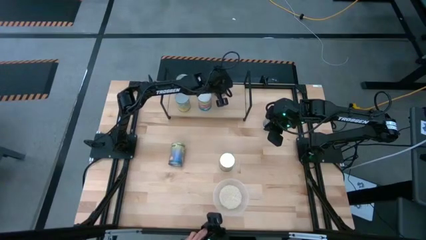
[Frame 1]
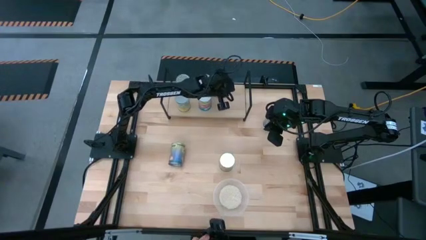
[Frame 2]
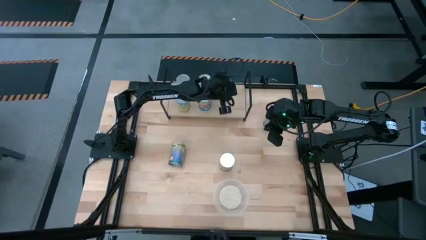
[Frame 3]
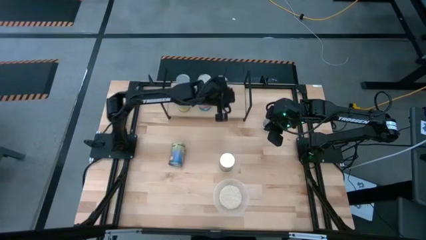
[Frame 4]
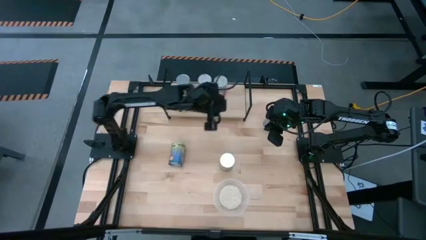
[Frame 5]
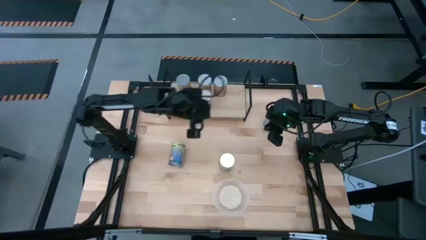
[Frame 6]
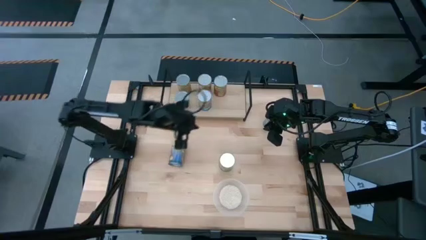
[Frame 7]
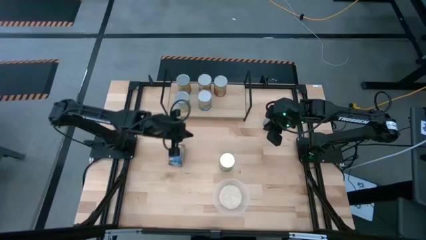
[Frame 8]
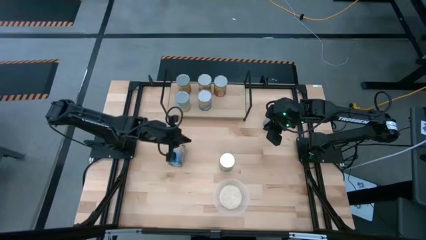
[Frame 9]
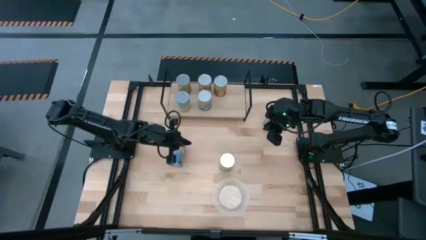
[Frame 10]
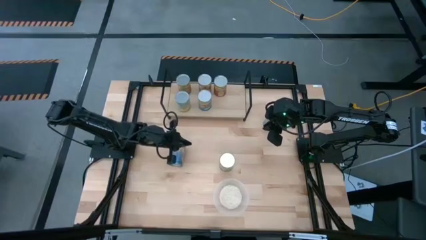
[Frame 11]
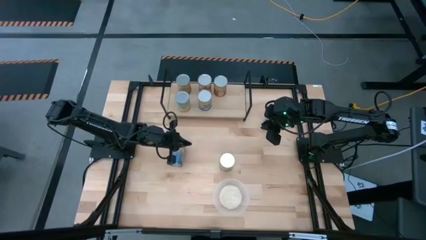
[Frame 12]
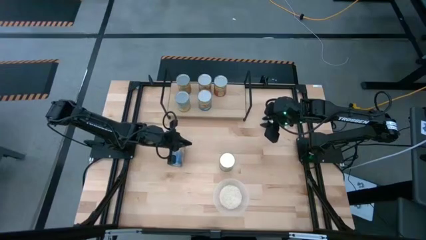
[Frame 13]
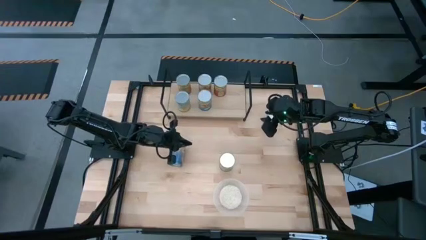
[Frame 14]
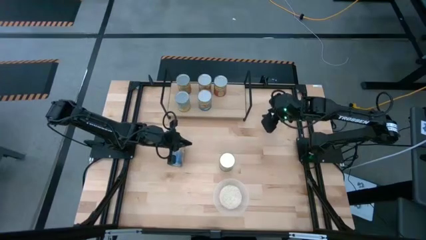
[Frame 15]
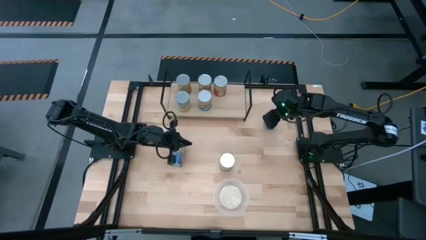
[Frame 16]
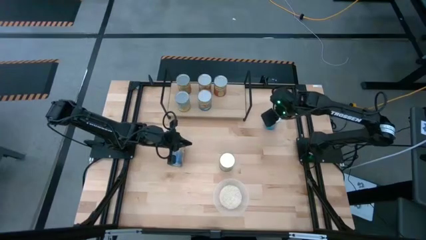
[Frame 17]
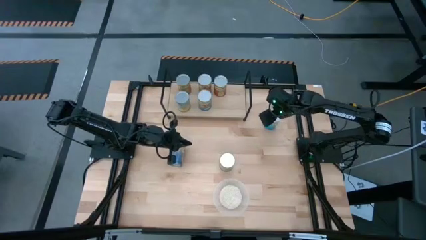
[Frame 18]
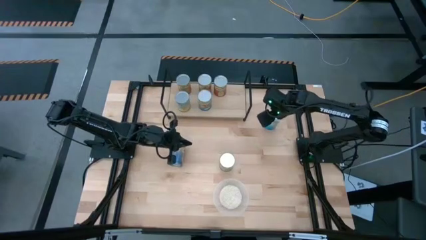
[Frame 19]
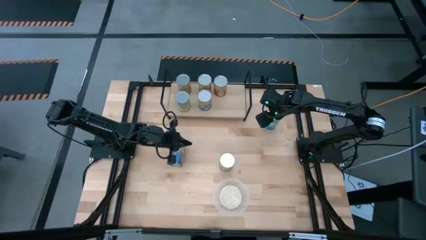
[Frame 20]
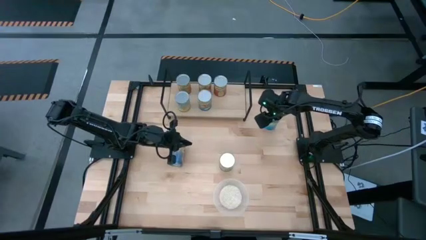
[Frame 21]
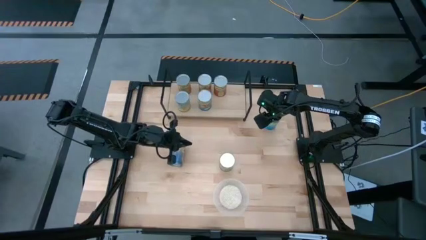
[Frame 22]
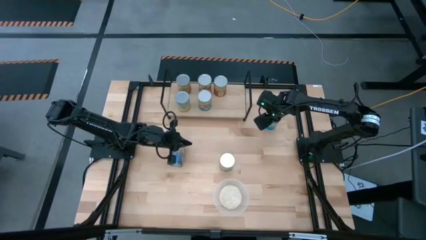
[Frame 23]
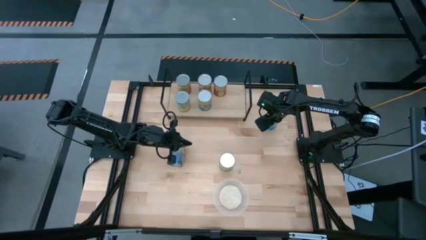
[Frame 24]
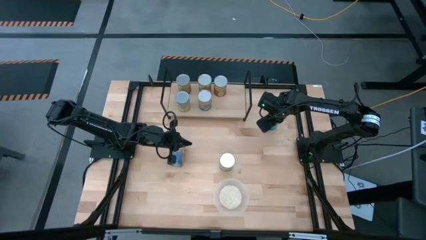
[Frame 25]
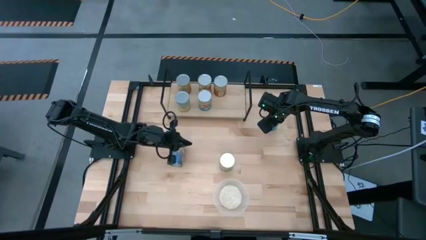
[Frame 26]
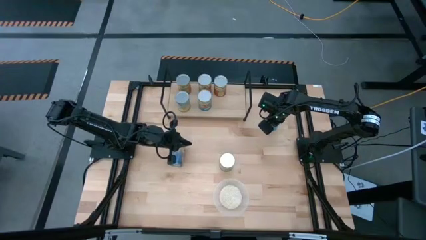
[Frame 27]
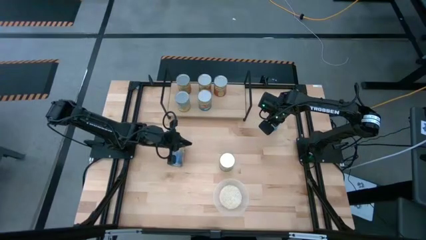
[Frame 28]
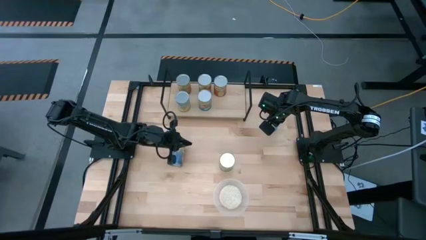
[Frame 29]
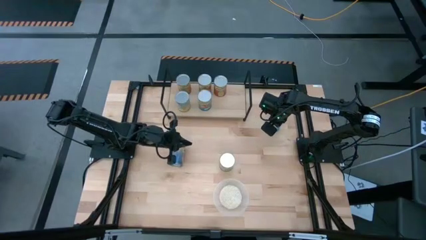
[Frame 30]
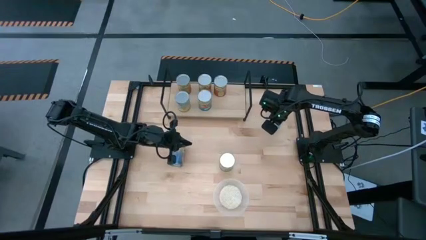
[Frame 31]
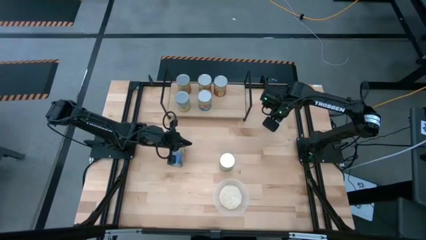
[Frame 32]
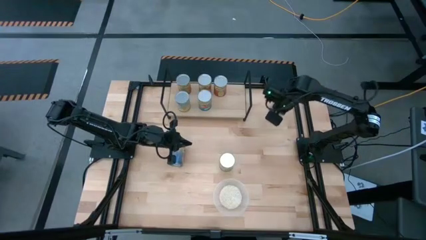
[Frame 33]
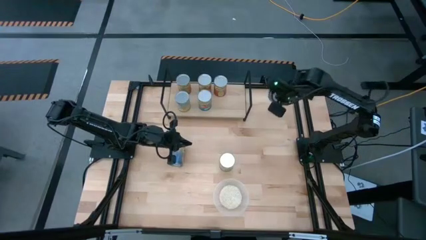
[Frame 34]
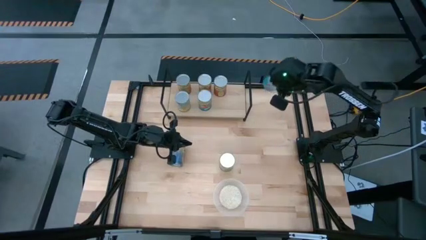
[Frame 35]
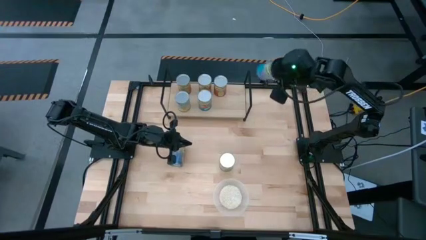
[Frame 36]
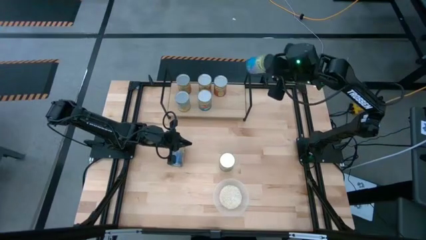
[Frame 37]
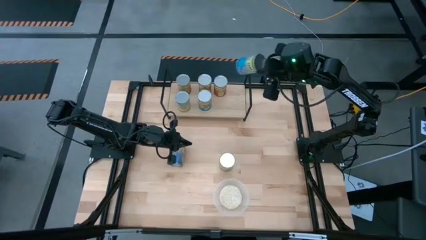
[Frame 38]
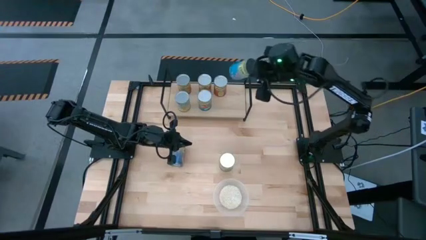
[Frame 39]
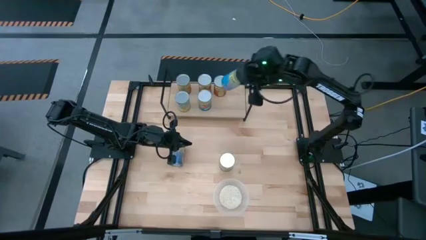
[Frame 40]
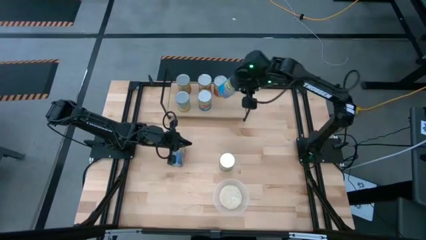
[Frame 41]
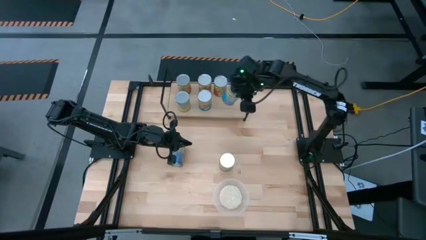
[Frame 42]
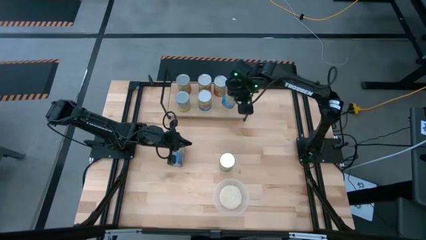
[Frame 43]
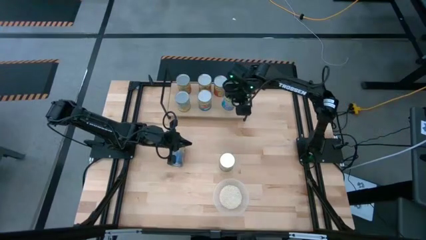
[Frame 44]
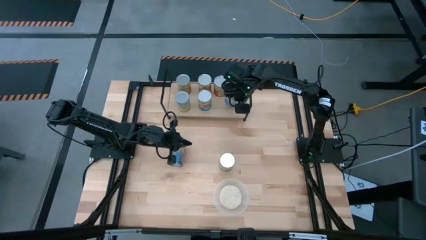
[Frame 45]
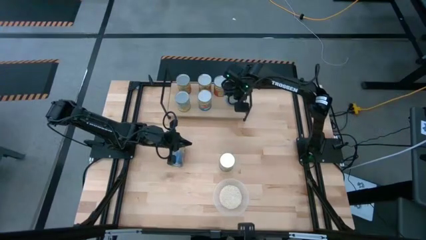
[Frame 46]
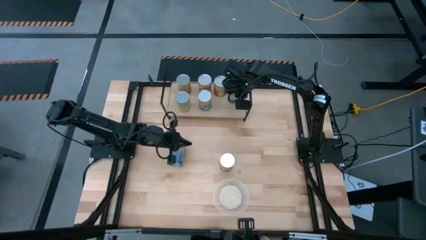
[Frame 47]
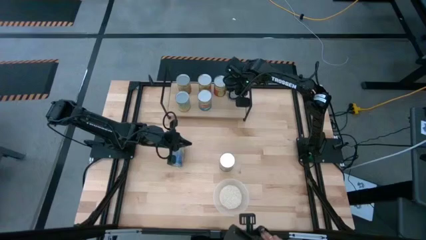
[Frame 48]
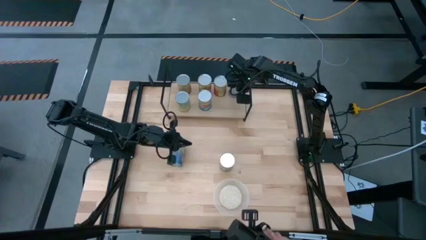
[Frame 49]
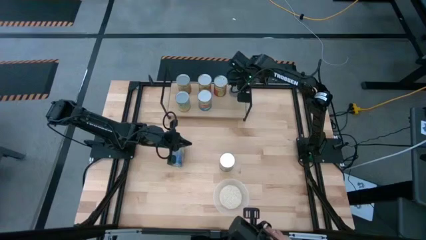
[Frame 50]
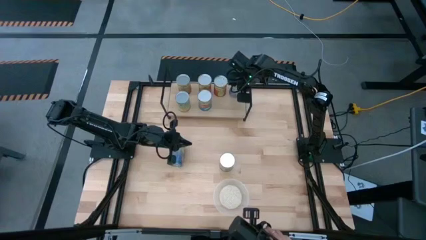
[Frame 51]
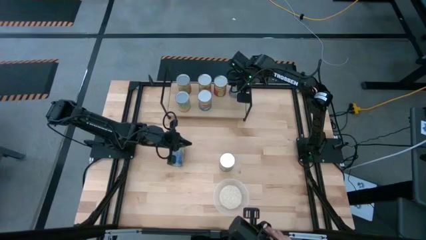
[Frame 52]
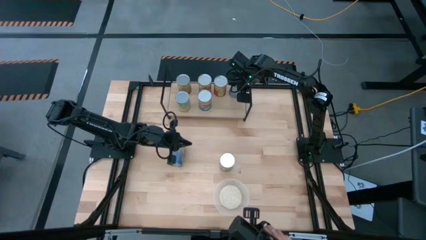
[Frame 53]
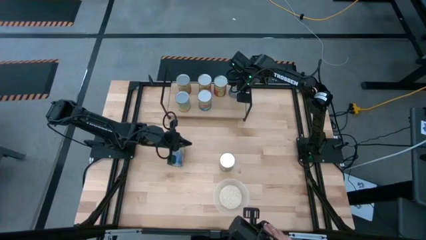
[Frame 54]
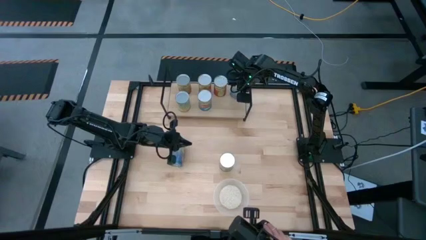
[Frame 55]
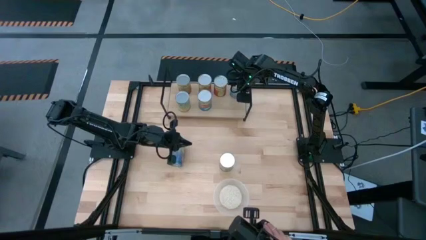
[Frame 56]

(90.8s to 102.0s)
Task: Pick and place cans onto a shelf
Put the canned cherries on the shelf

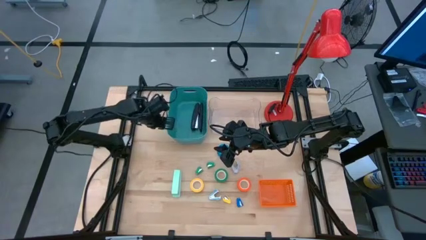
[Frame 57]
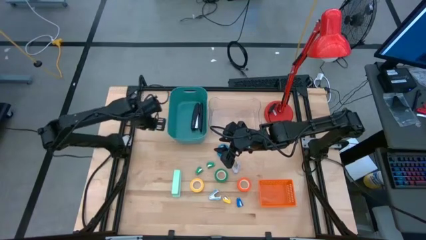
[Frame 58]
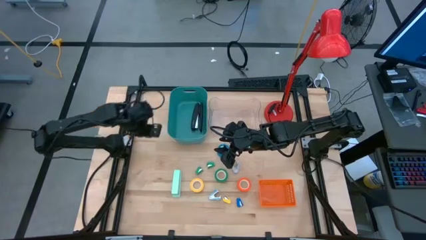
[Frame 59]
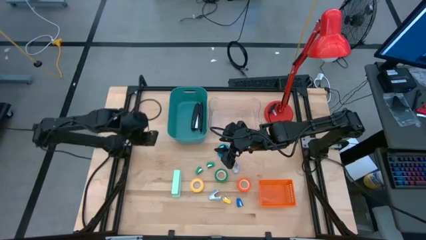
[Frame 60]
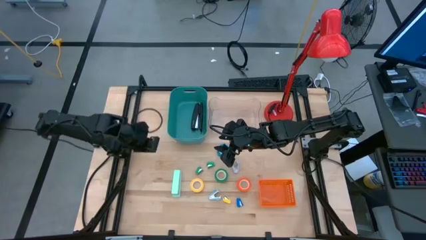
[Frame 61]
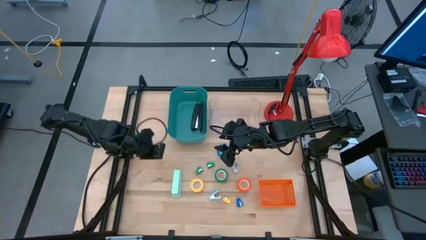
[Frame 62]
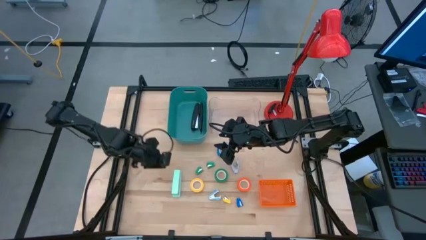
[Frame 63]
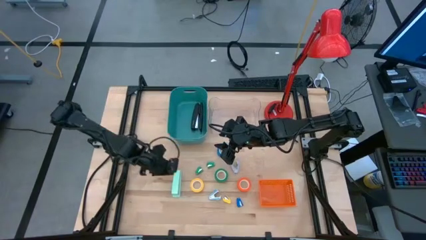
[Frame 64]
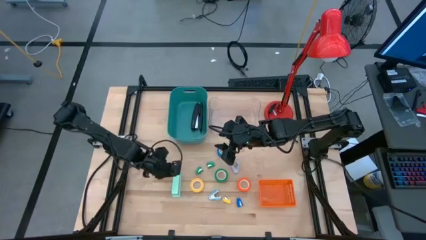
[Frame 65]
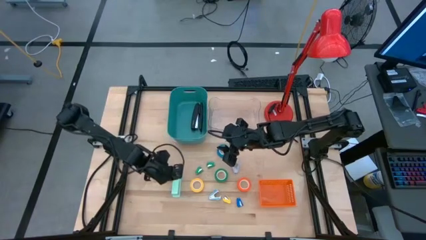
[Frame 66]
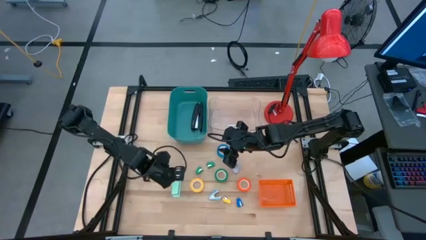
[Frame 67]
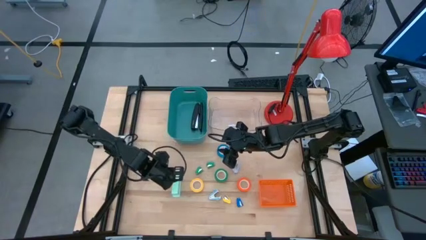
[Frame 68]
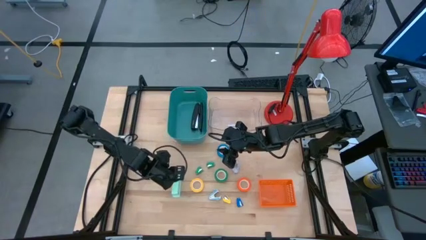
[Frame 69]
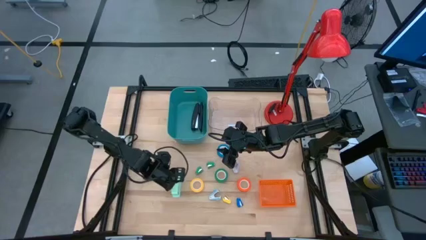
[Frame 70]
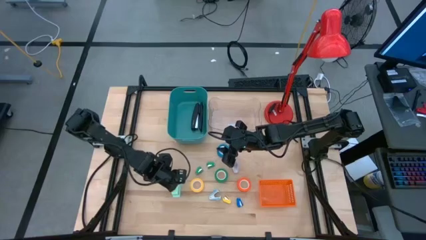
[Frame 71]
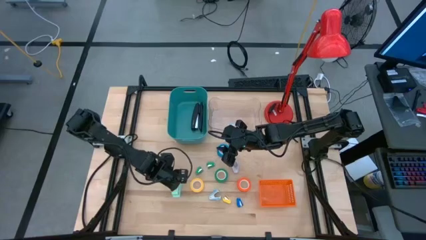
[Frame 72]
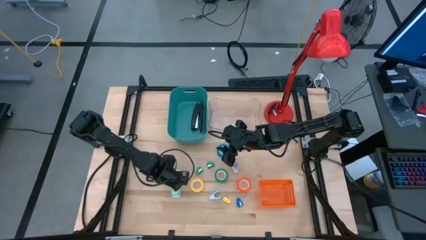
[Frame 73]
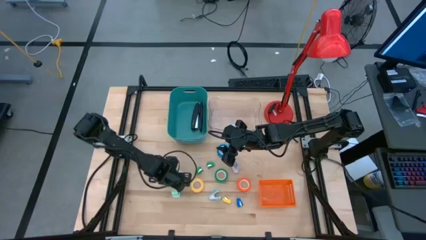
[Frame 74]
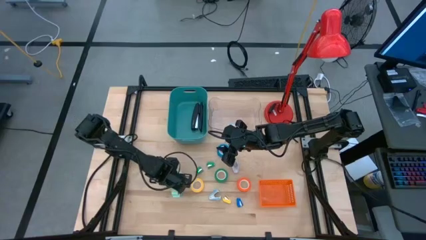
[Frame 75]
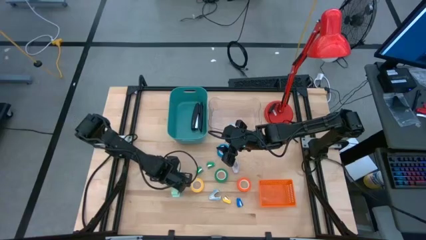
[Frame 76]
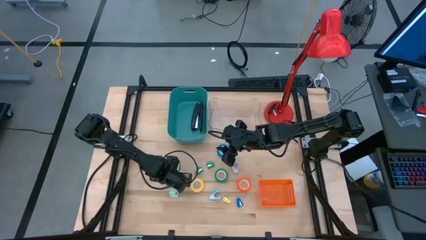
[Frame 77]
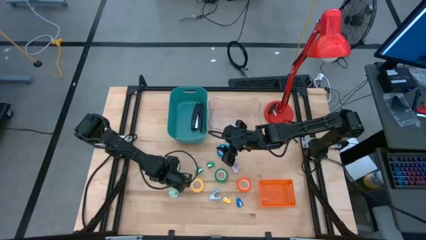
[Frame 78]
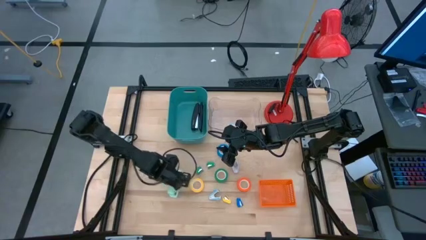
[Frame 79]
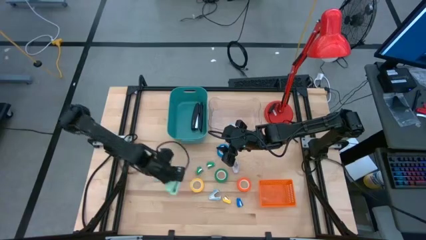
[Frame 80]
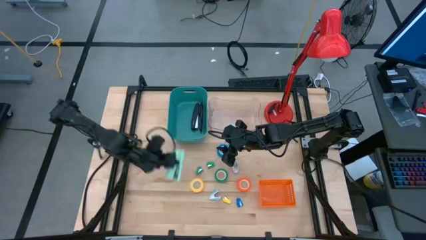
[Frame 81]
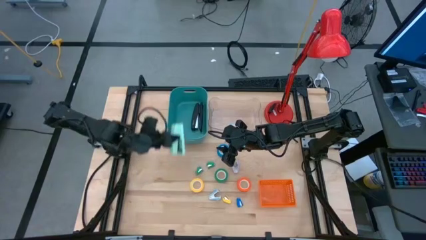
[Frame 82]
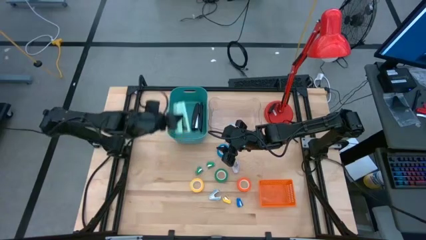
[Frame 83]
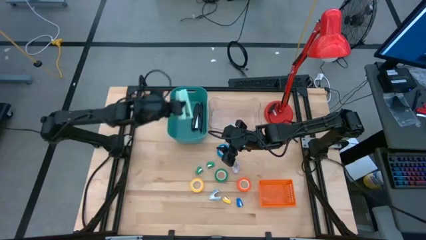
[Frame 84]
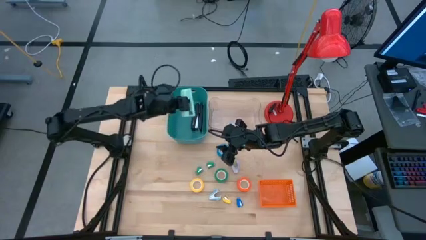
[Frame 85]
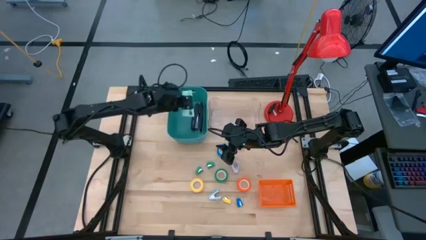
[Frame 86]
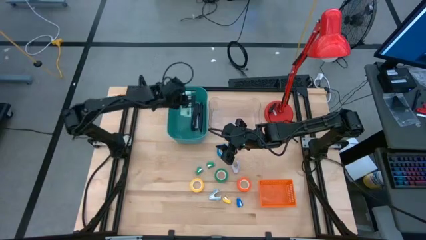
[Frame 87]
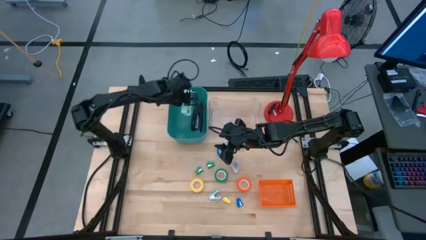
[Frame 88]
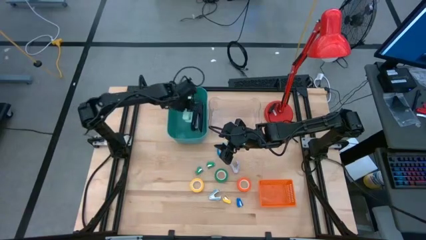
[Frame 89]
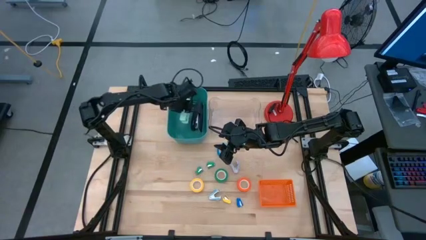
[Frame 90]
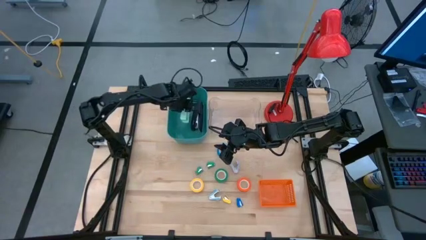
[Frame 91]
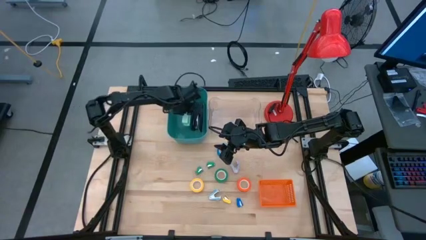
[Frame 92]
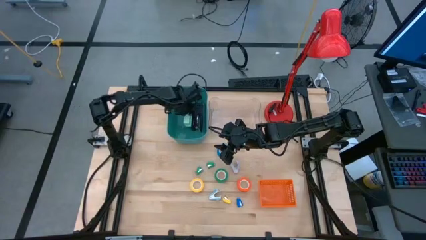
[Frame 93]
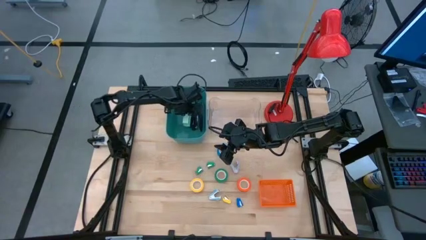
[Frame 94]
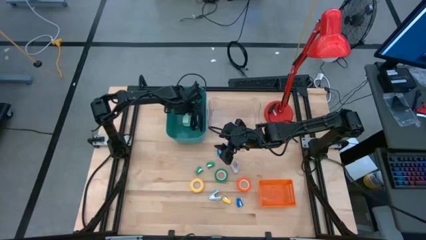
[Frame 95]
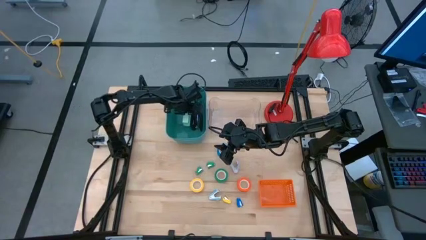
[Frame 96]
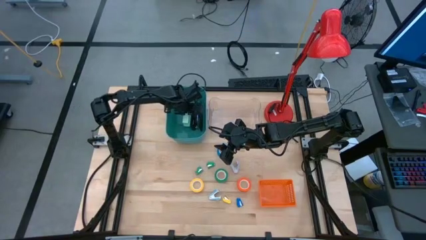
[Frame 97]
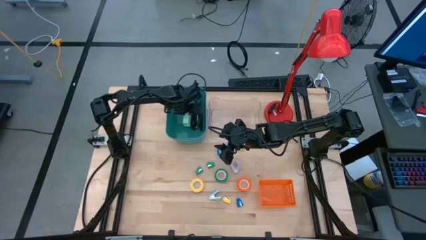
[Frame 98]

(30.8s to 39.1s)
Task: Pick and place Stapler, Stapler remover, tape
Put the large light blue stapler into the blue bin
